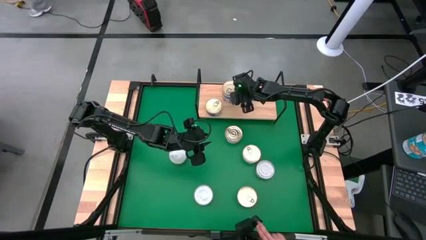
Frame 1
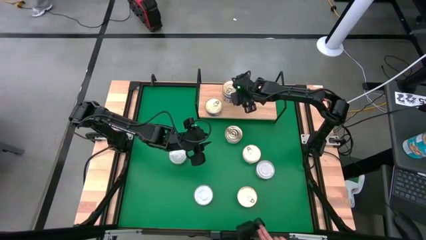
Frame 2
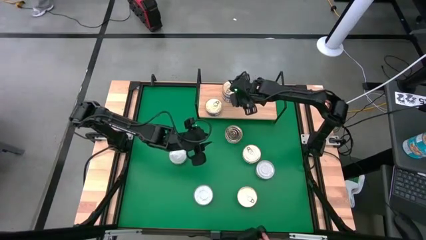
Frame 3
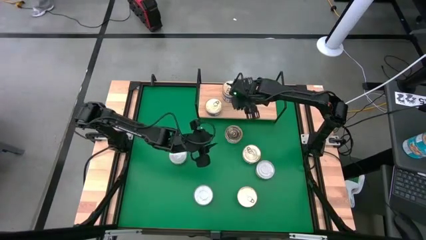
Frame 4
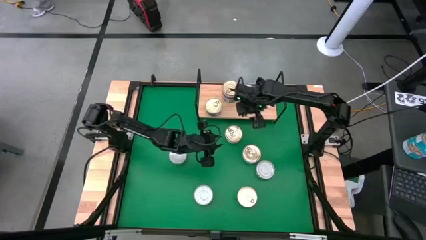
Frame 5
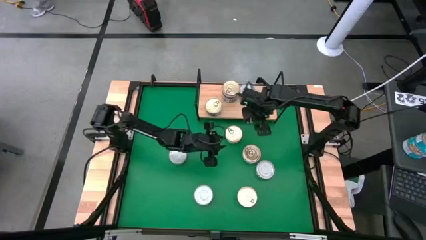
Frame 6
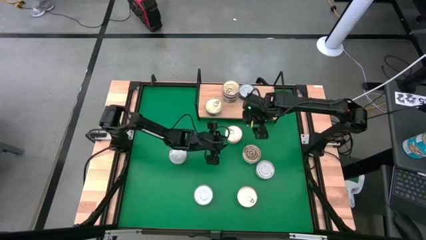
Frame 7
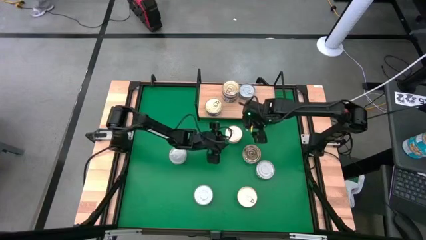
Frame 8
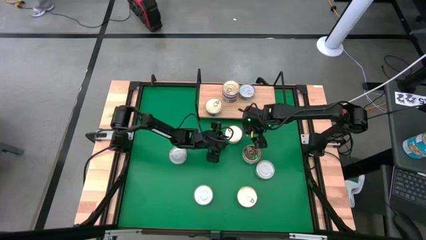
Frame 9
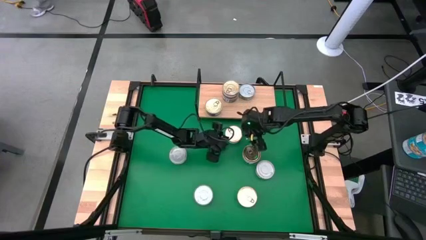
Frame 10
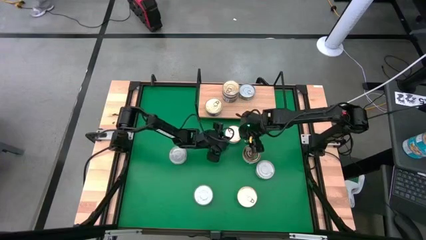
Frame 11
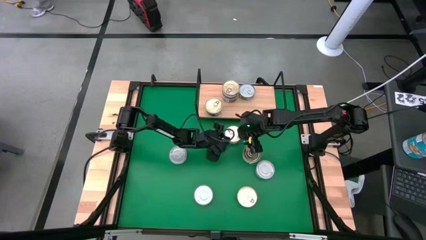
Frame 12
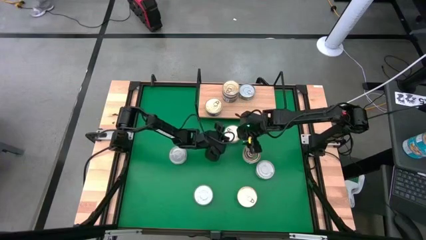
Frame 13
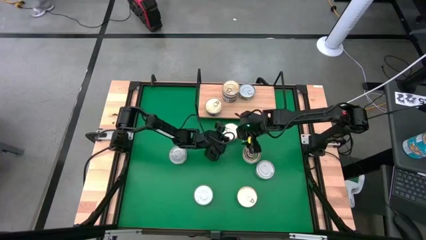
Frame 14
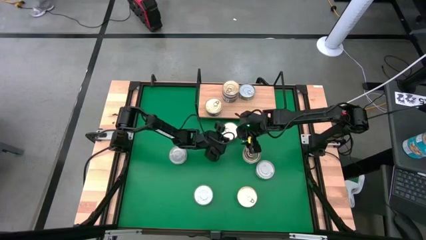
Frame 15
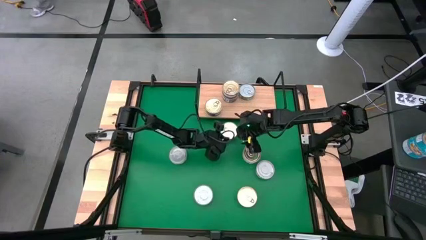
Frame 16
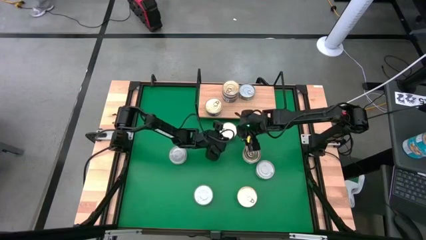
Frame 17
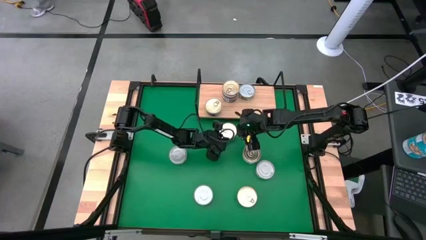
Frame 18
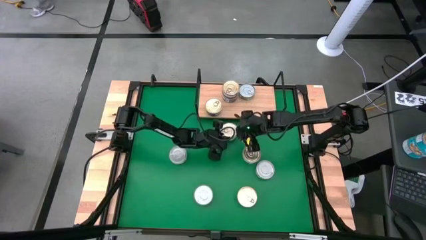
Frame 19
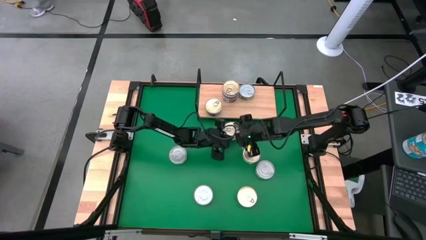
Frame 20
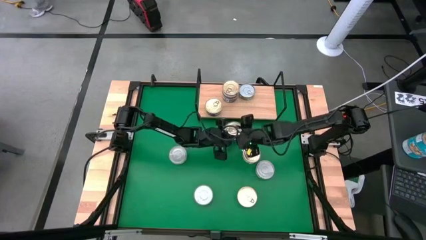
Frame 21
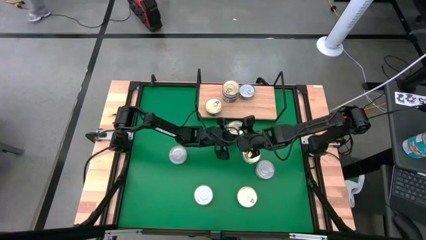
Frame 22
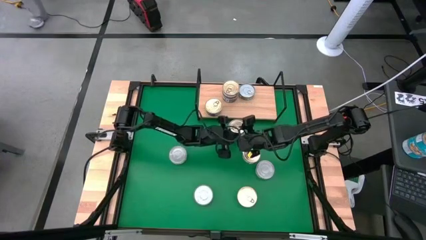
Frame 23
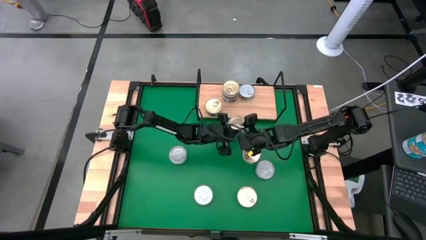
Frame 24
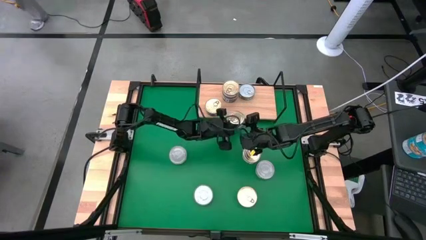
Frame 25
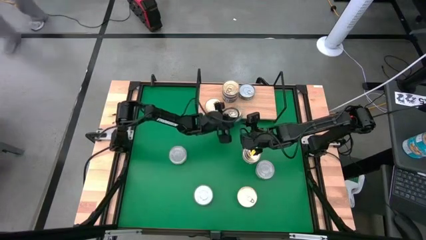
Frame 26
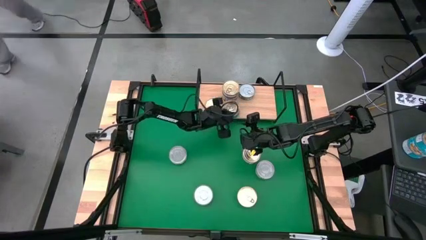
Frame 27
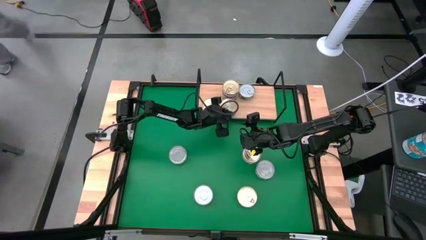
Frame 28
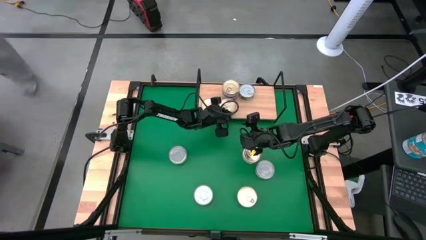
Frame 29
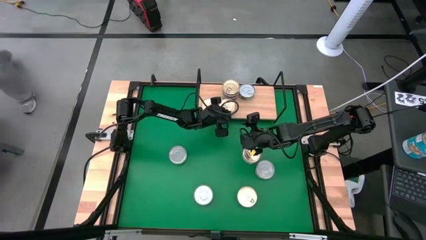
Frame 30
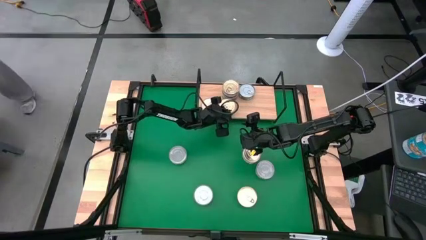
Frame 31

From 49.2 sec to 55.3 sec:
Task: Stack canned seafood by type on shelf
Put the blue tuna can on the shelf aligned with the blue tuna can

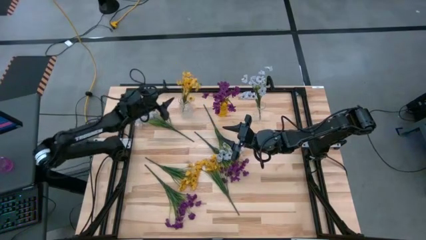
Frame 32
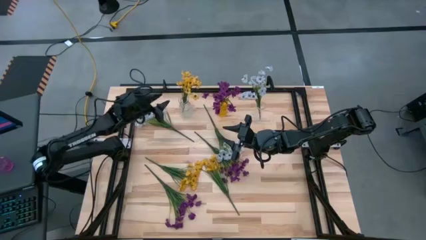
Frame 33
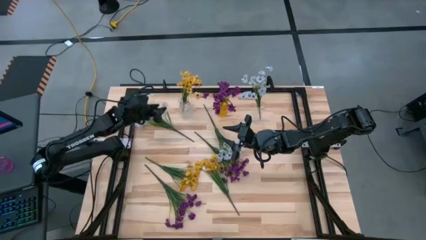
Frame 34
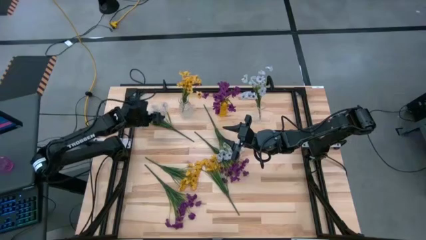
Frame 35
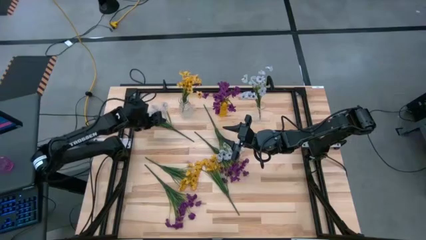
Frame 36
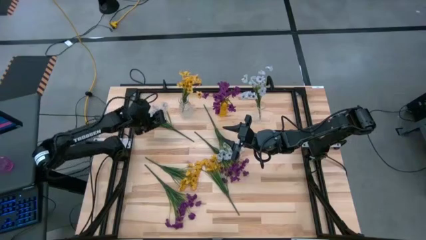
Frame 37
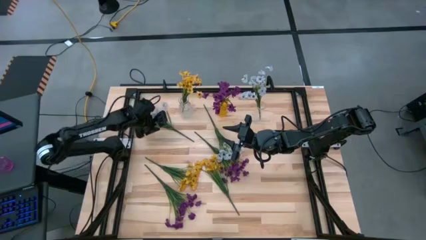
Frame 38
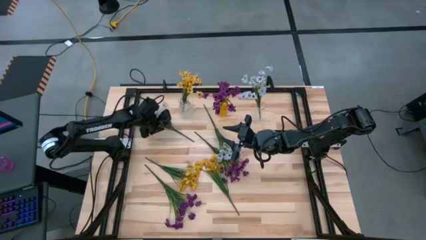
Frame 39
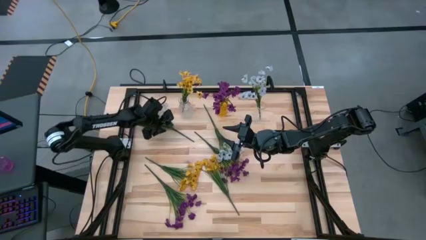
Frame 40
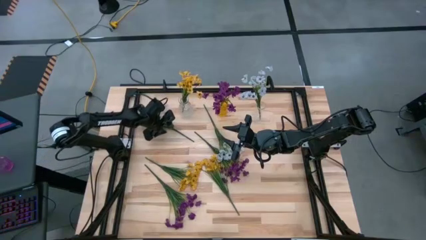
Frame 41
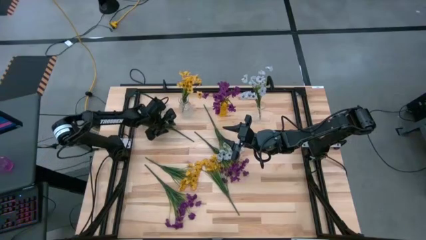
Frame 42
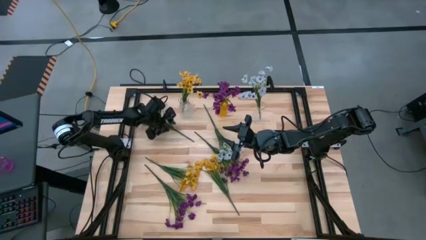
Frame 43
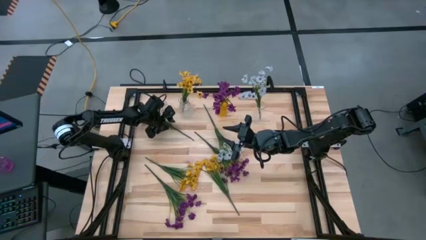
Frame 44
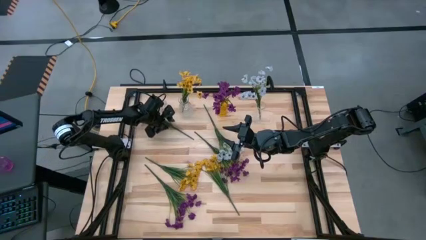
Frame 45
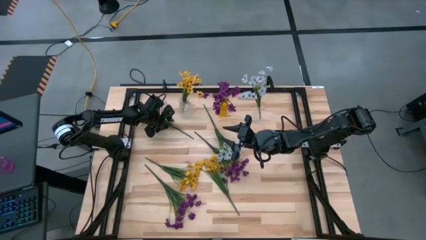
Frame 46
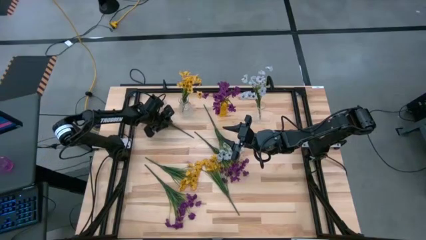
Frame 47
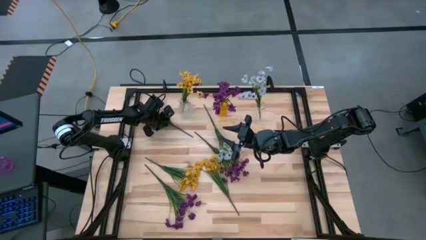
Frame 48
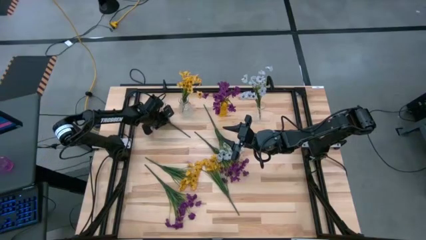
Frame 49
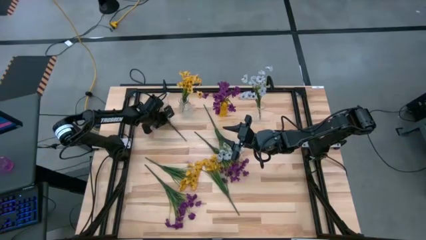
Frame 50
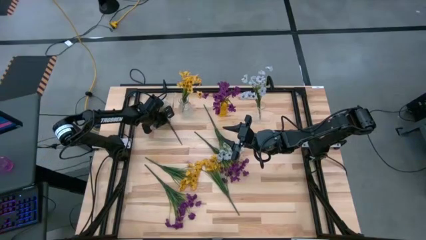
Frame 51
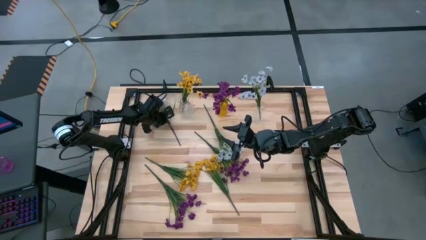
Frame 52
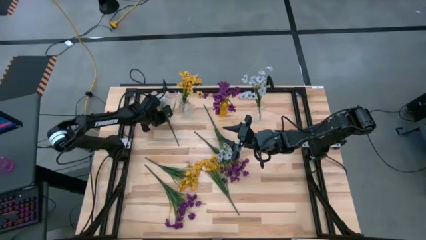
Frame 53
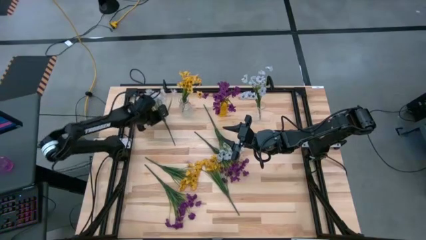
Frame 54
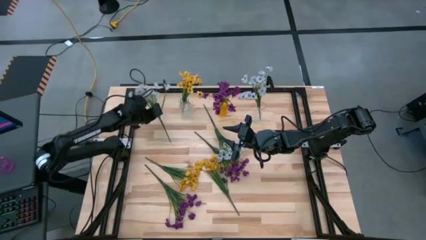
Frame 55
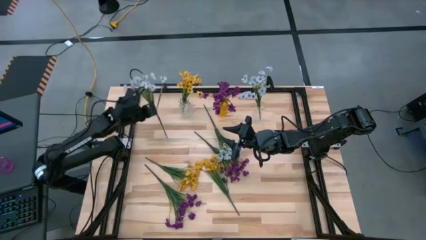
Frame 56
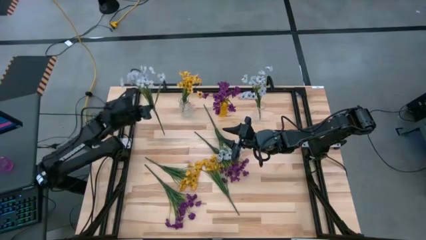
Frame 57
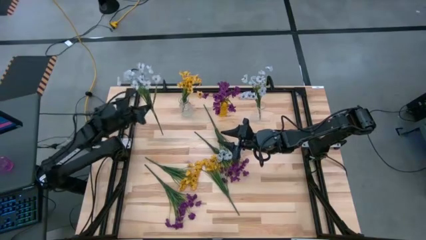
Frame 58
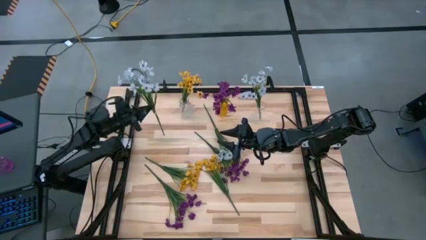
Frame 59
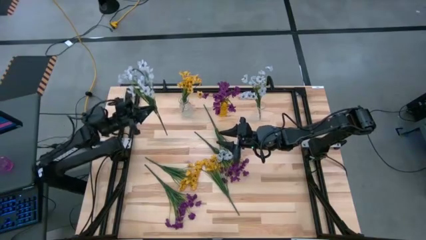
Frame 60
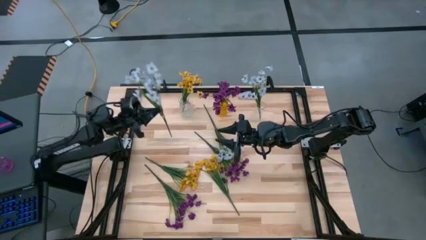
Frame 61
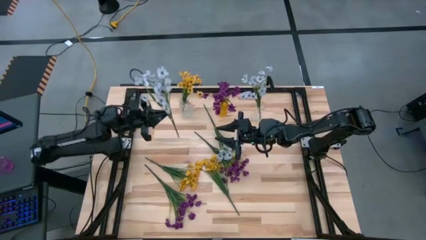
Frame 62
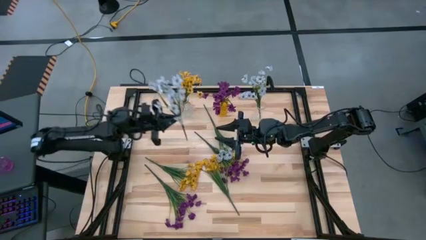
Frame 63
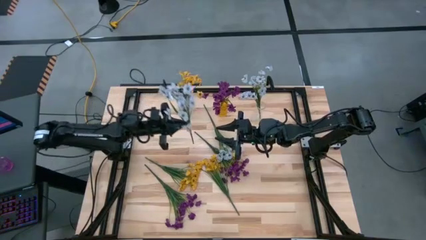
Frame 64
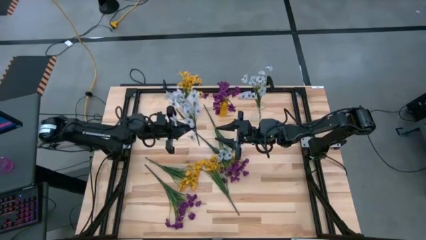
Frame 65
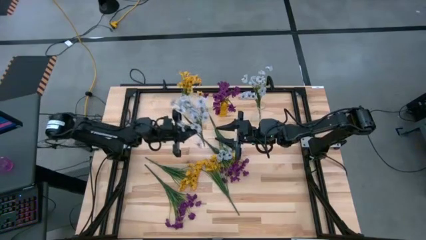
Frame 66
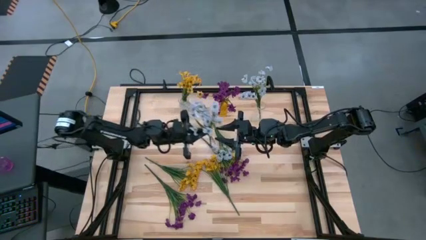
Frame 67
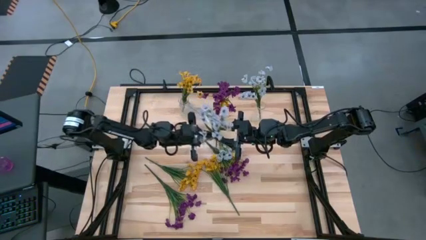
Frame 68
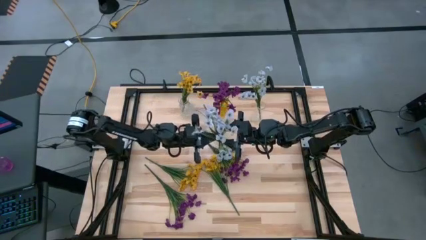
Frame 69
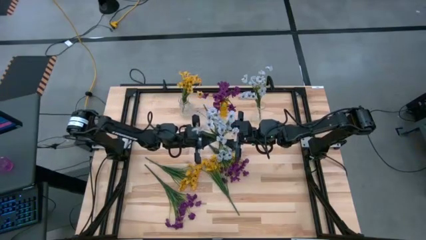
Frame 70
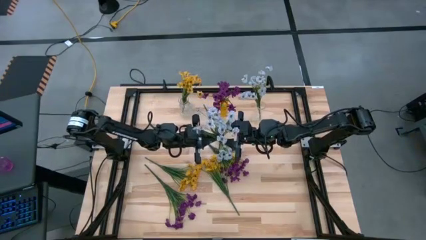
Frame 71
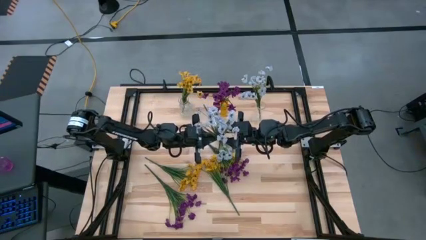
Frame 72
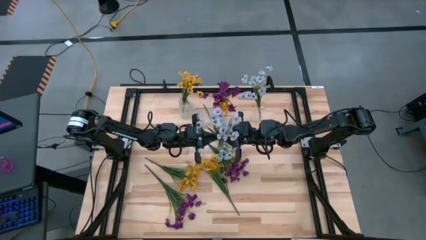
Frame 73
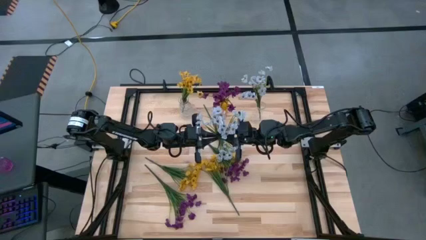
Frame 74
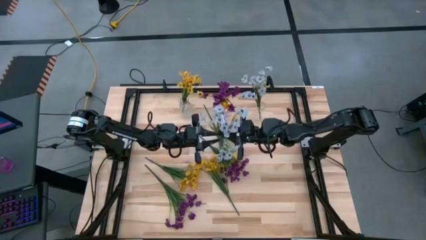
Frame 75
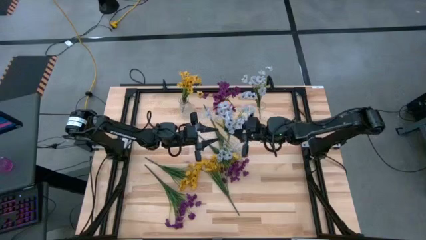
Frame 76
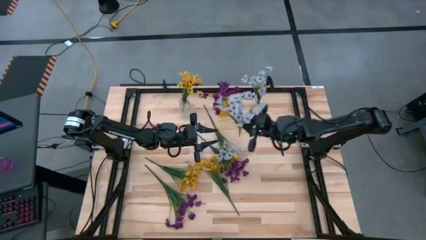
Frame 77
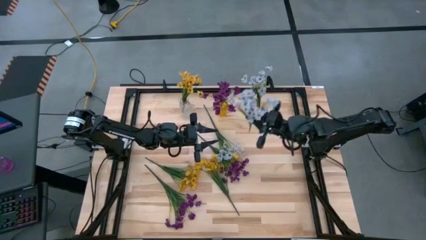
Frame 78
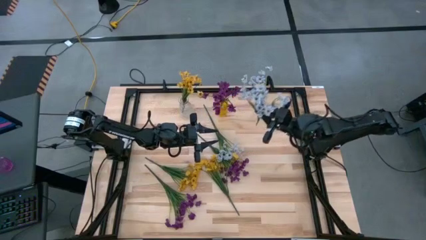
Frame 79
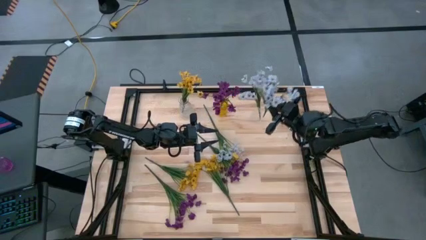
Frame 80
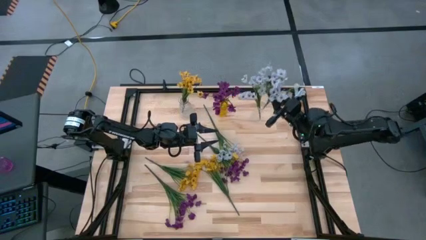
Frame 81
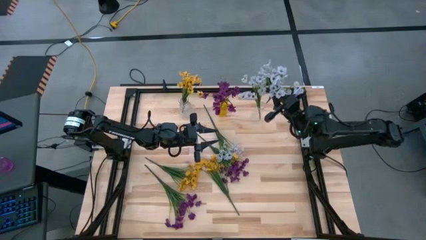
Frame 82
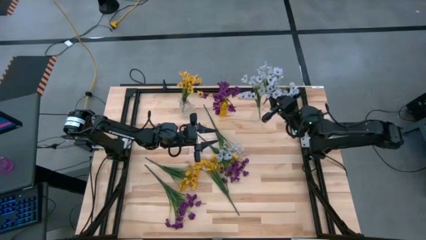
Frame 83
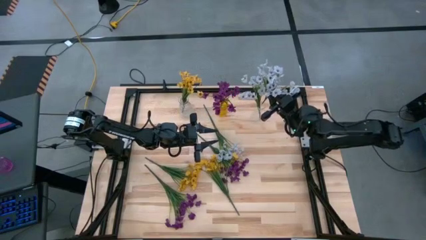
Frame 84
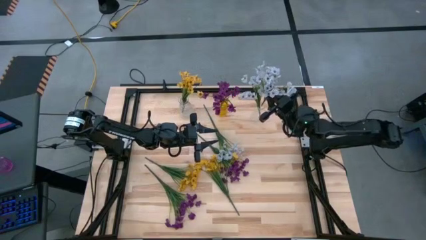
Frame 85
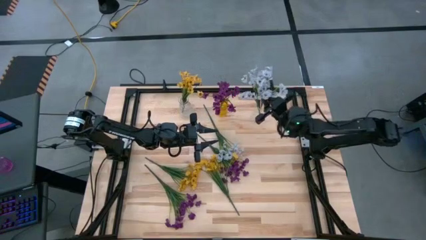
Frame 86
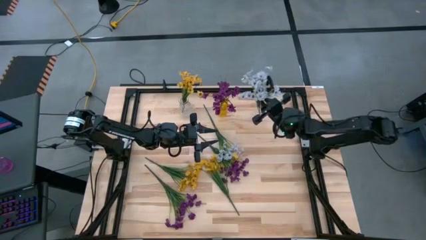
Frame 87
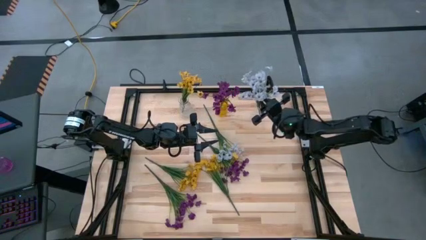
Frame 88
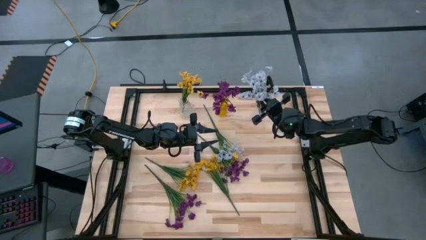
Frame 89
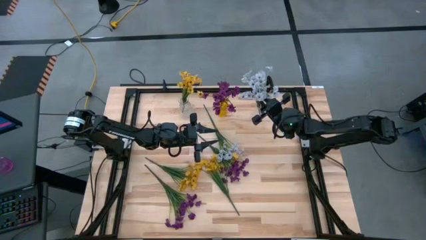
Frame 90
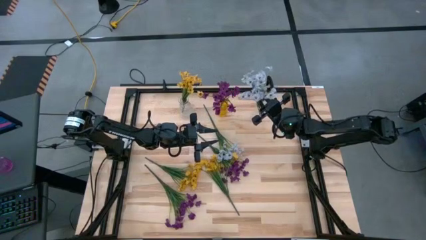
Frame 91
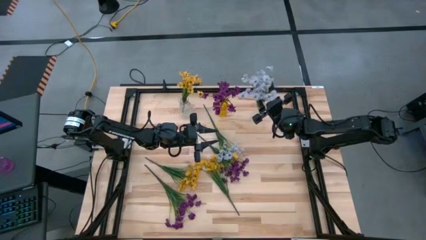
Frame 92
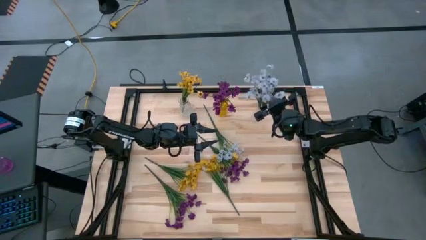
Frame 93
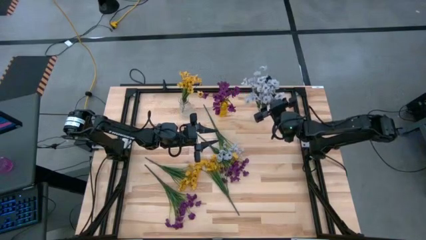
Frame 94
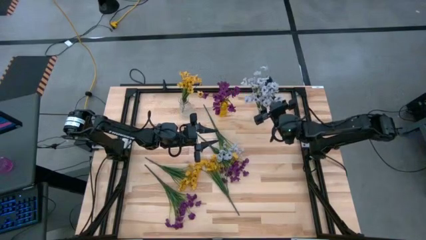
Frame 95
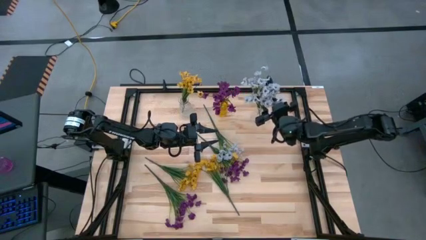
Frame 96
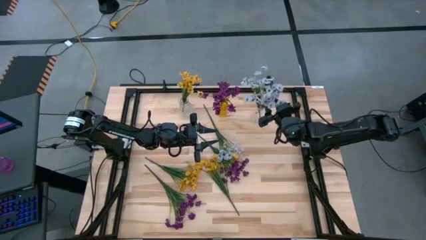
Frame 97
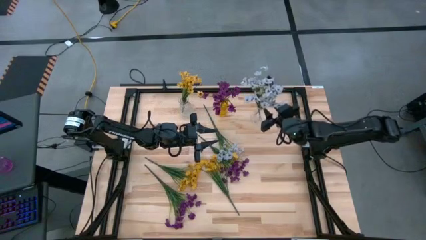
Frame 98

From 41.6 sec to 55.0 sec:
Task: Sort flowers into vase by color
Put the left white flowers into the right transparent vase
